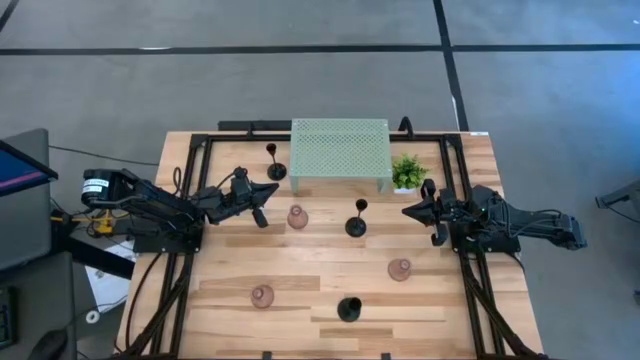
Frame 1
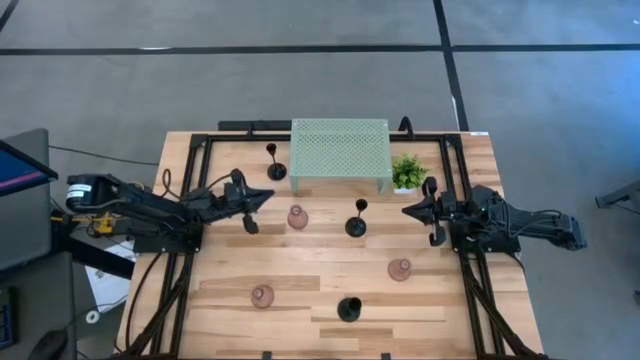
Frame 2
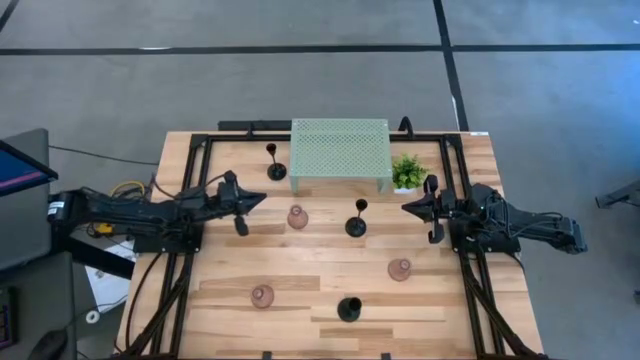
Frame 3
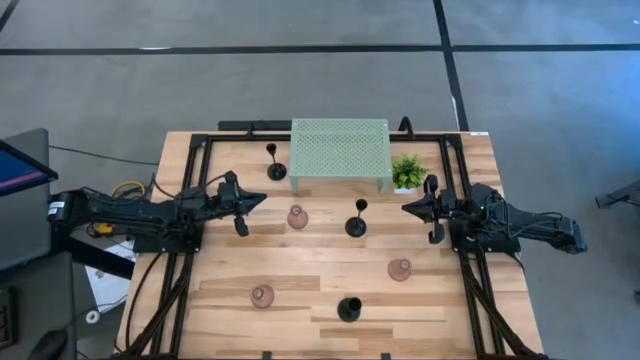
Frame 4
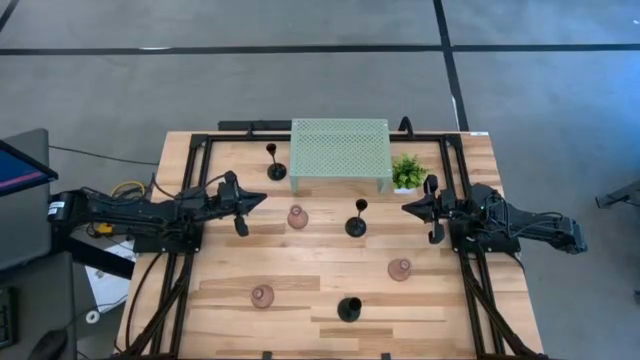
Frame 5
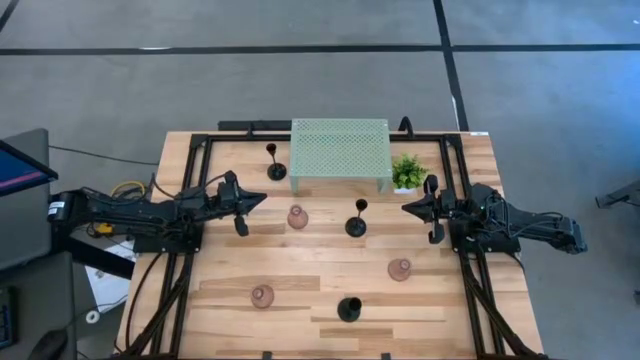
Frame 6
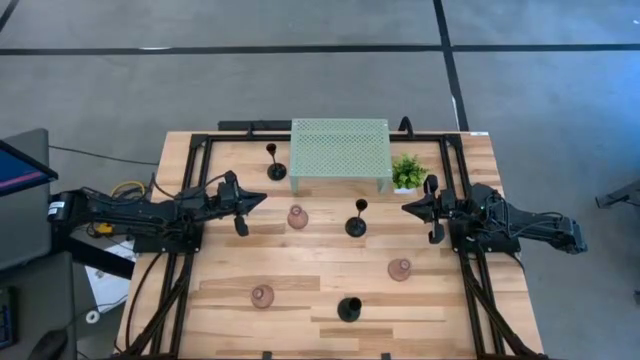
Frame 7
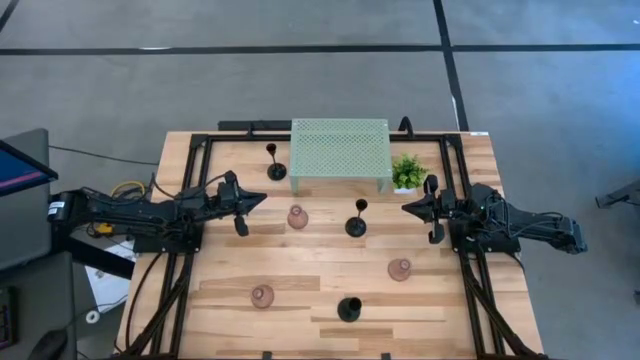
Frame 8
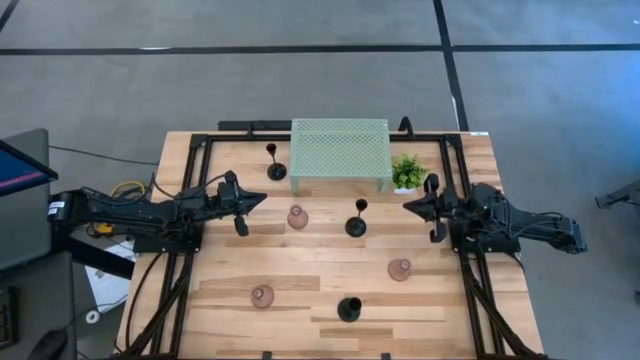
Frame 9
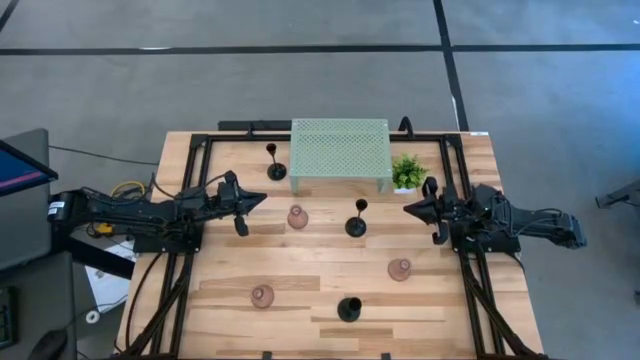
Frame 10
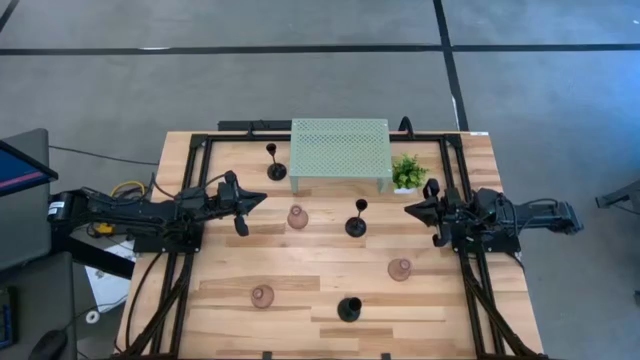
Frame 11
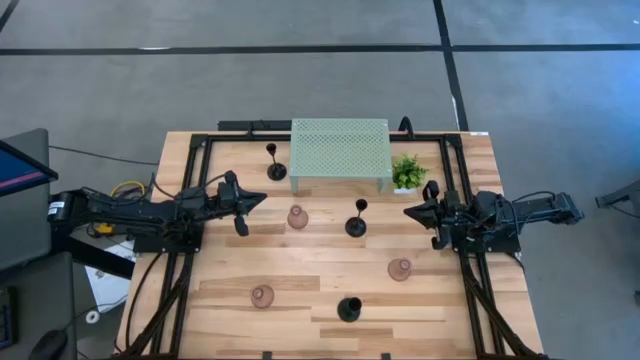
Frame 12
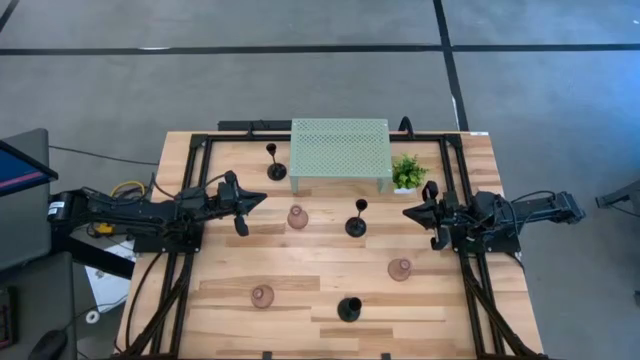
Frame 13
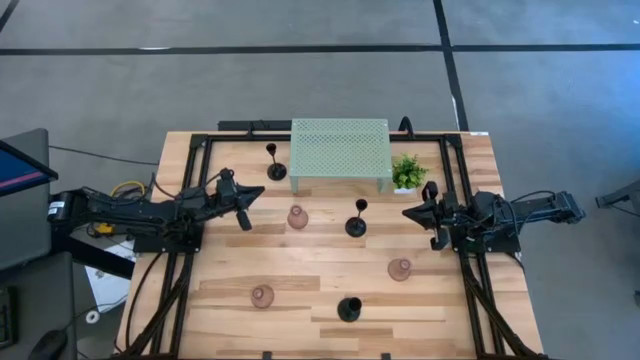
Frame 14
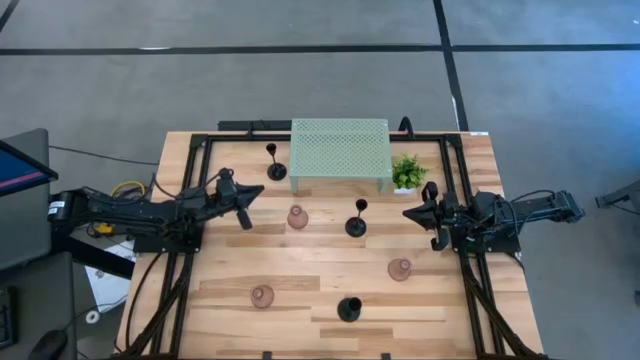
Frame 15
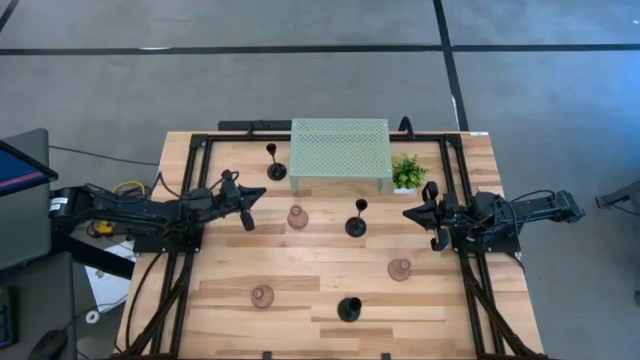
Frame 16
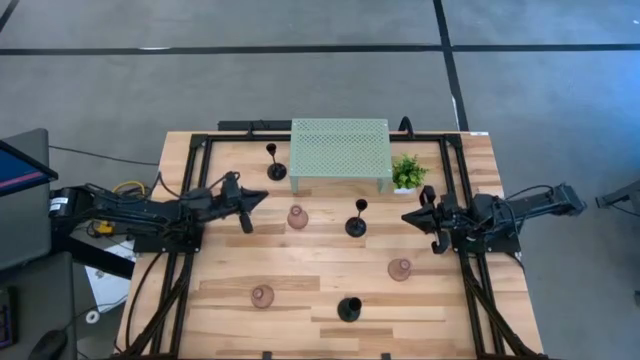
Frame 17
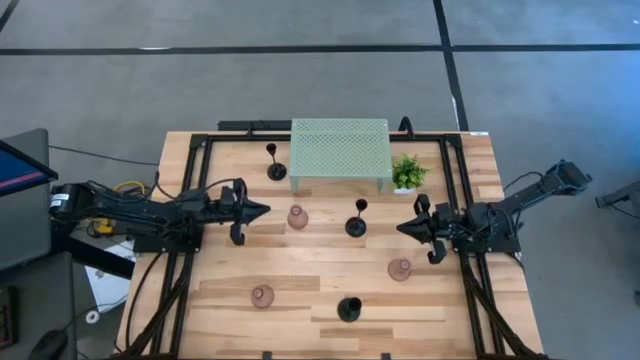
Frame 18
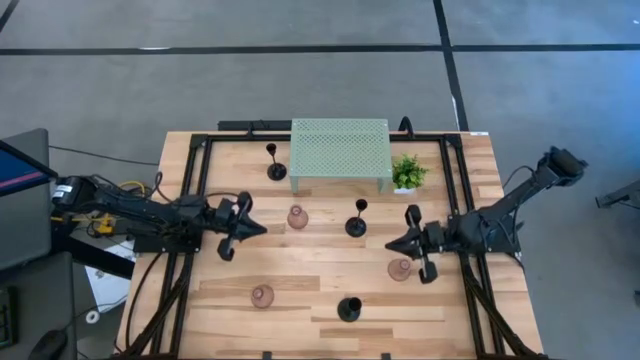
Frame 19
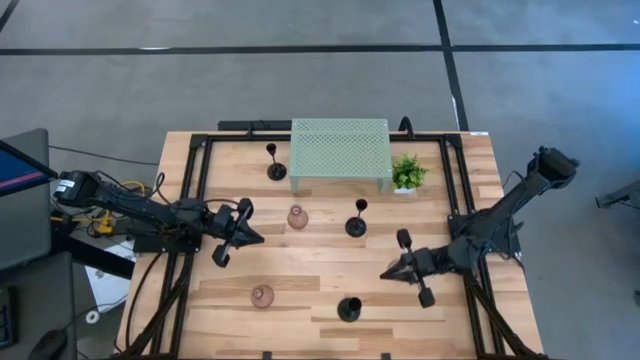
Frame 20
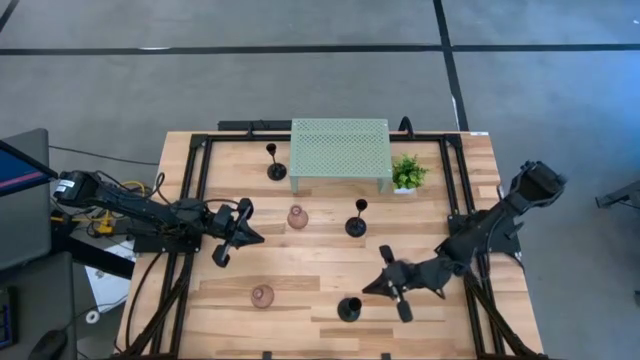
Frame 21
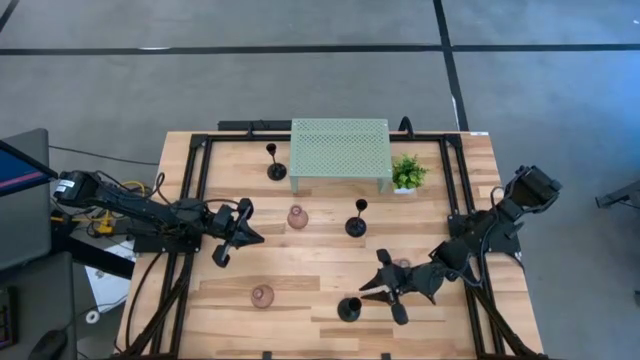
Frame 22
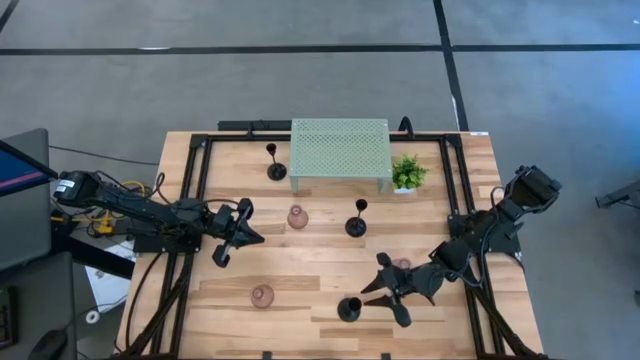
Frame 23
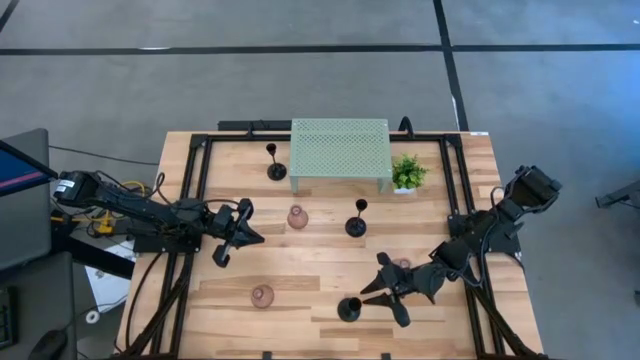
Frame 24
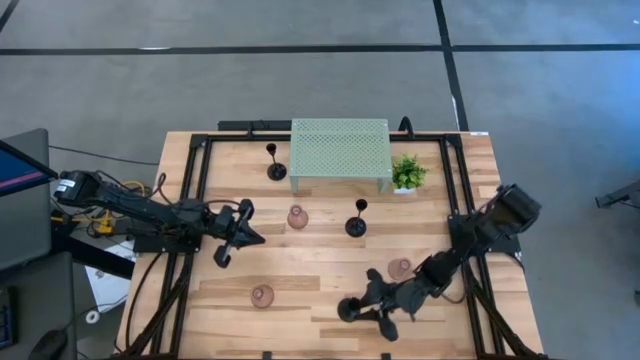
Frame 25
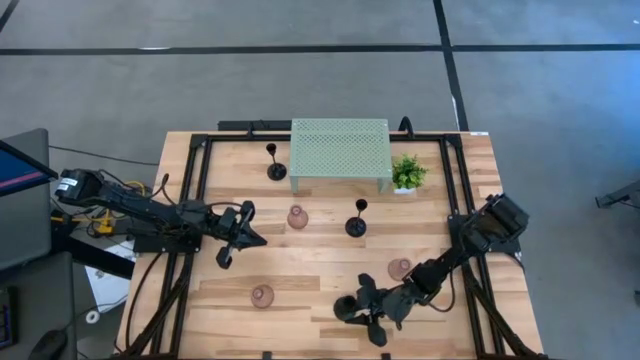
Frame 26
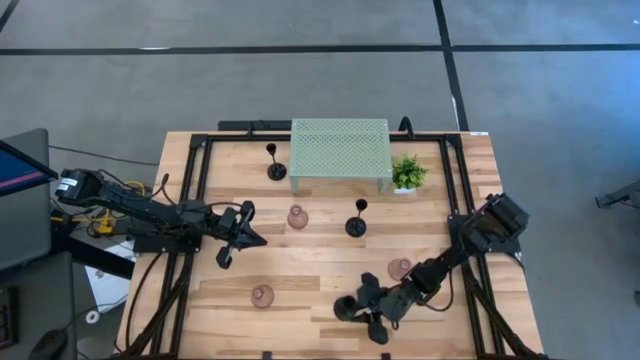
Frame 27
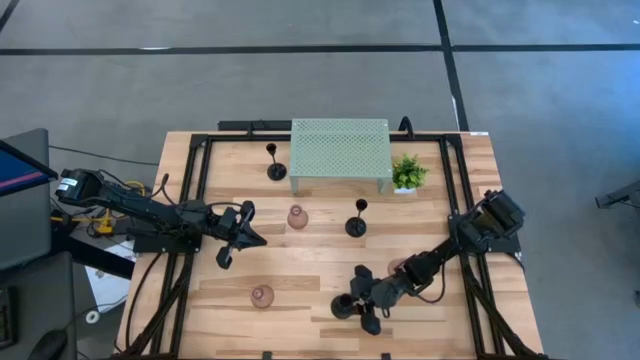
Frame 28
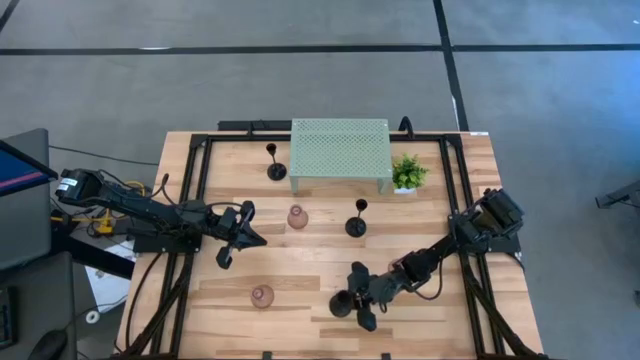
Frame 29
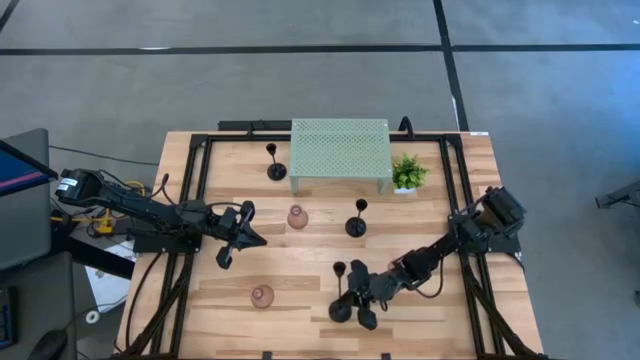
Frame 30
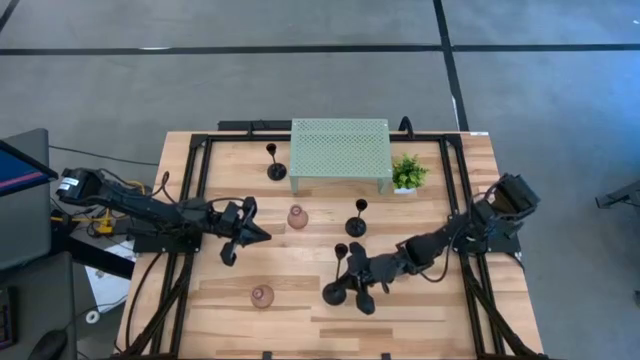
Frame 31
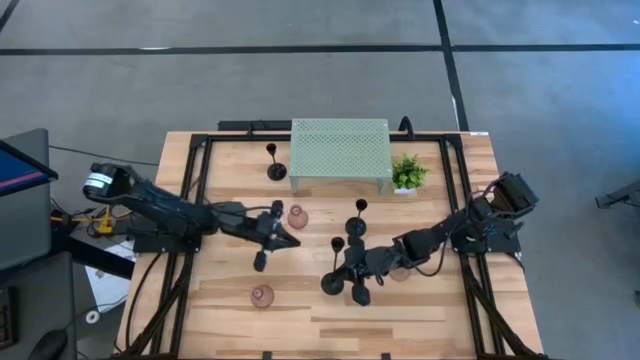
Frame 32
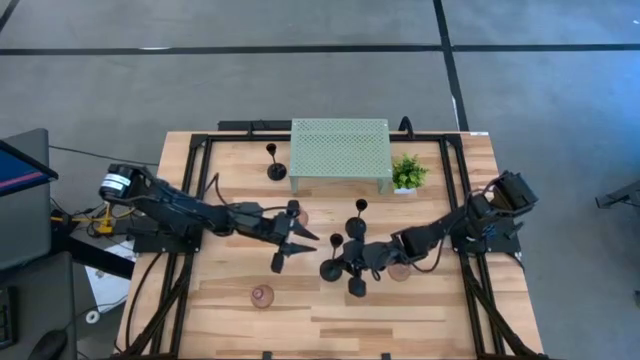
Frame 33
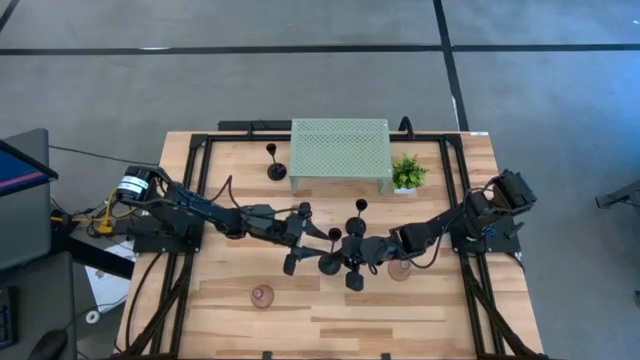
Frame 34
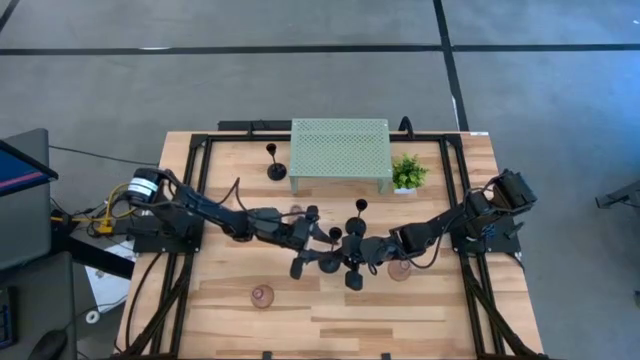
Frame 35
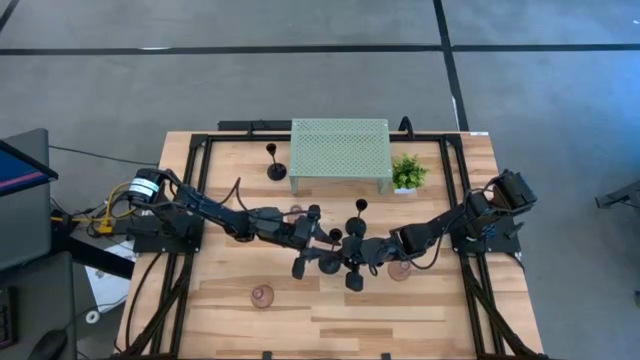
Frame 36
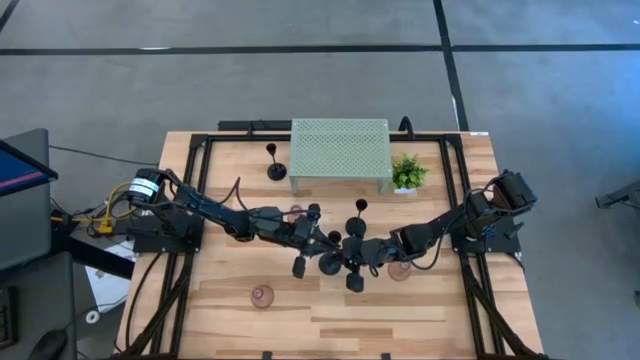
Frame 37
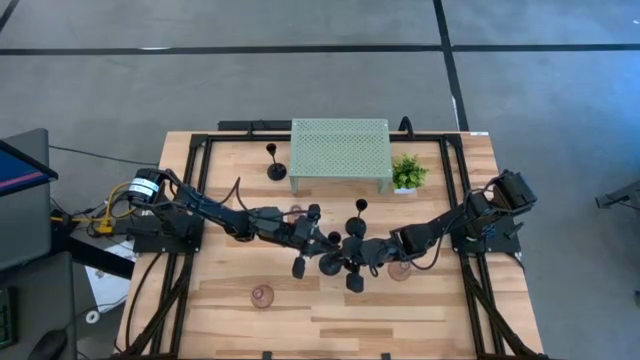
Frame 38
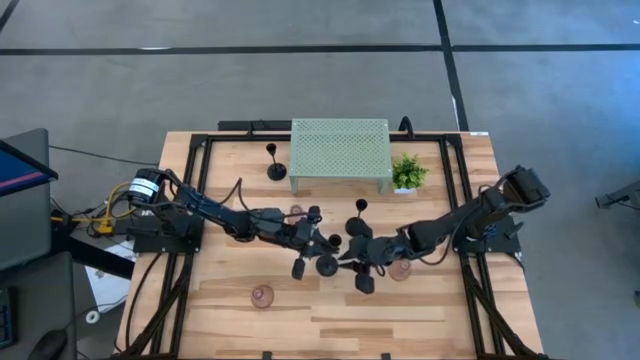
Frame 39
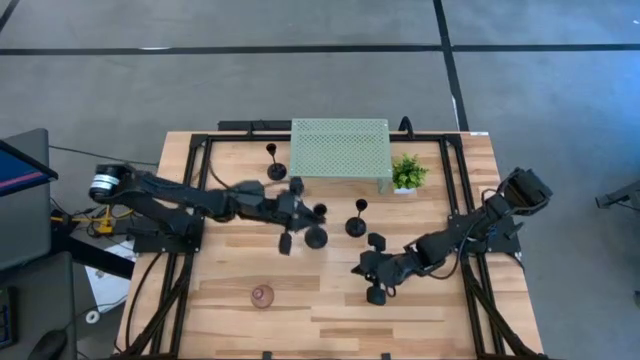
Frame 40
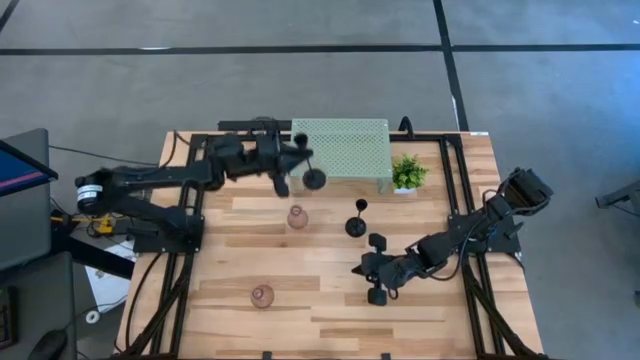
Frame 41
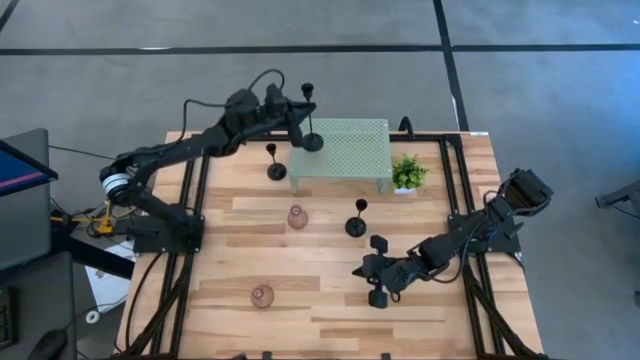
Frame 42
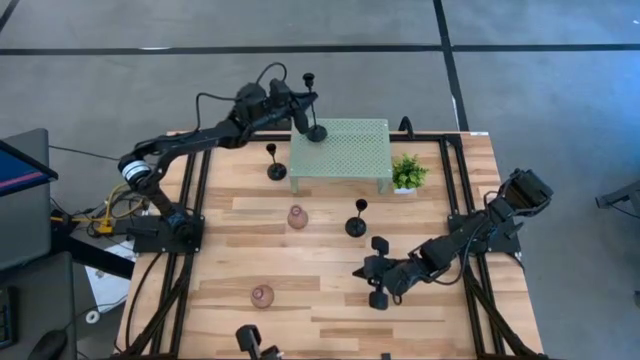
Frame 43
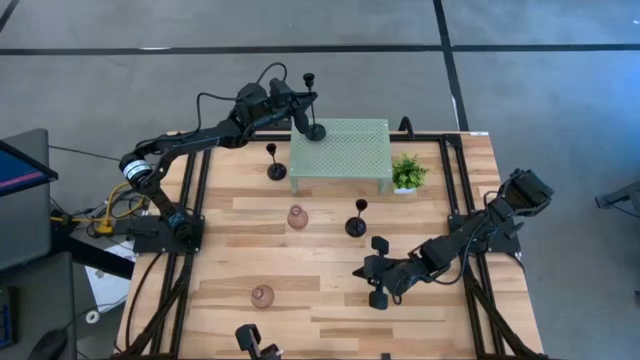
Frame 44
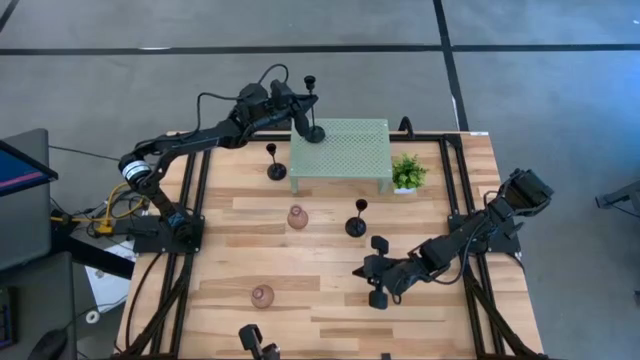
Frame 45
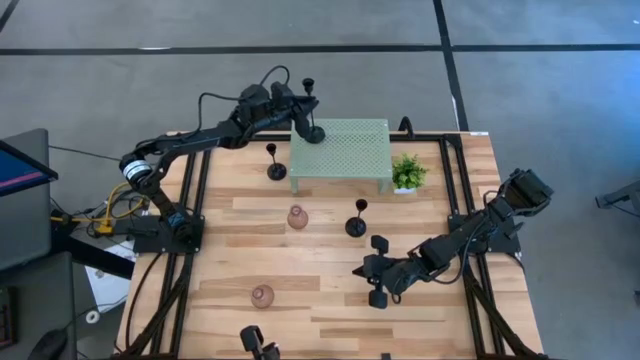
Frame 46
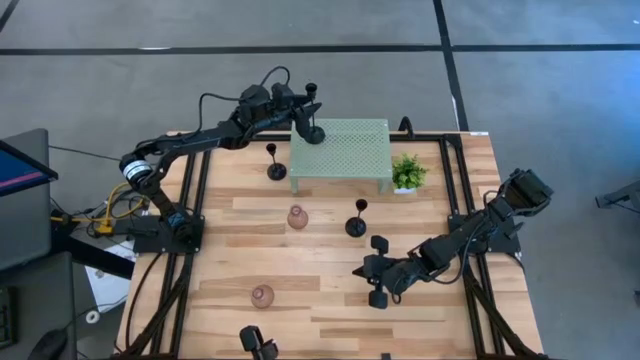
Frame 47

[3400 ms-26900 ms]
Task: Pick & Place candle stick holders
Put the bottom black candle holder on the shelf
